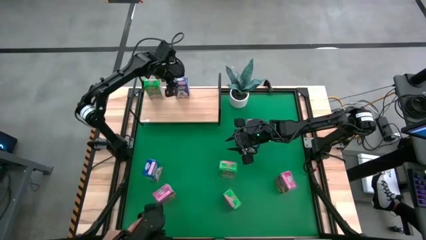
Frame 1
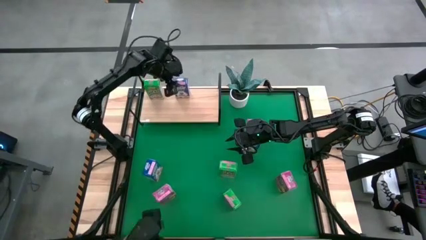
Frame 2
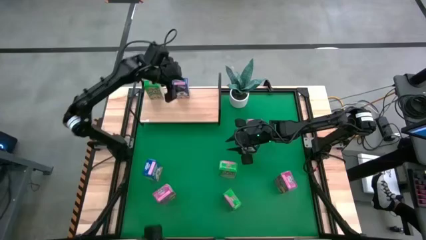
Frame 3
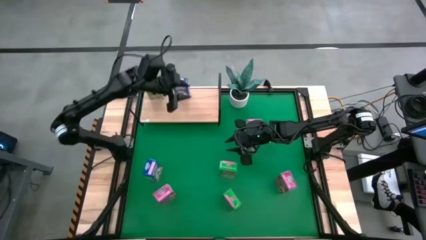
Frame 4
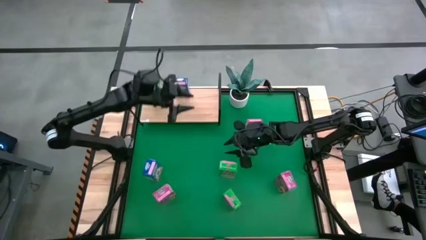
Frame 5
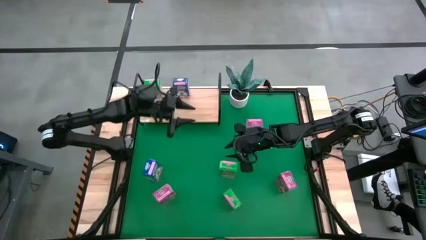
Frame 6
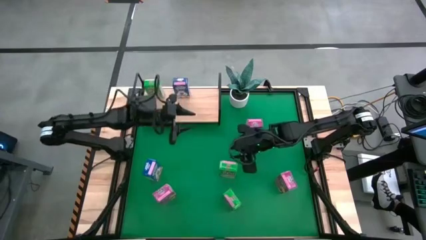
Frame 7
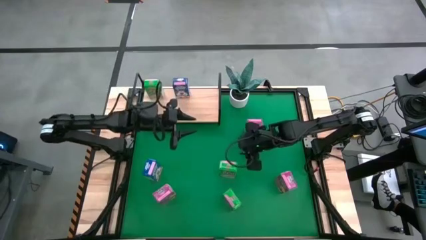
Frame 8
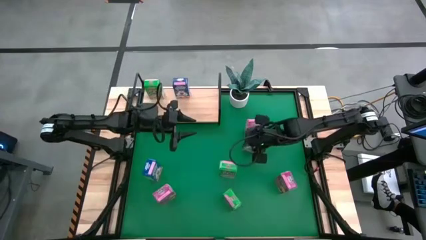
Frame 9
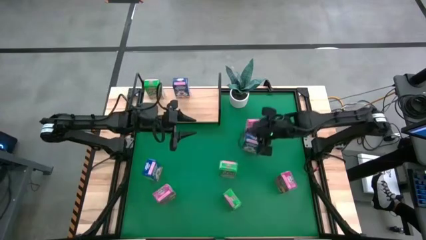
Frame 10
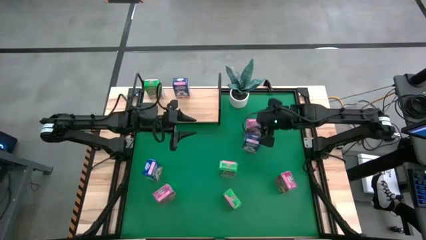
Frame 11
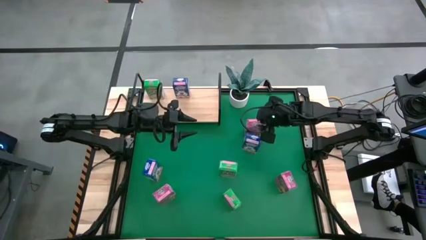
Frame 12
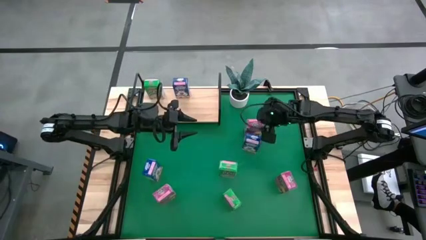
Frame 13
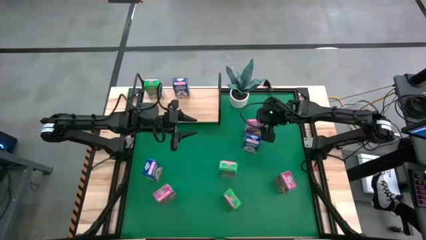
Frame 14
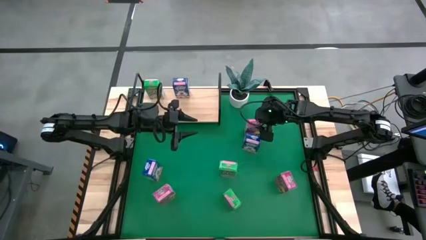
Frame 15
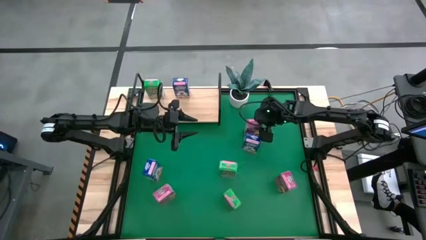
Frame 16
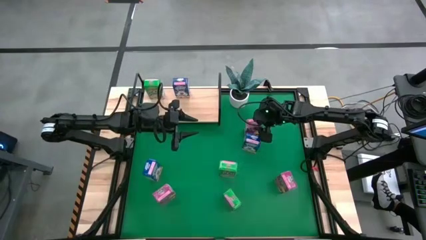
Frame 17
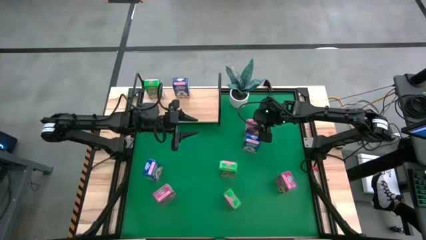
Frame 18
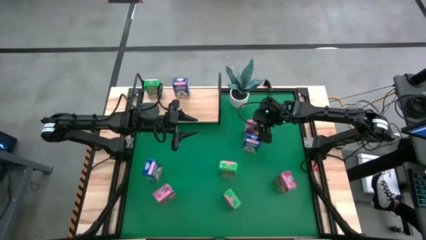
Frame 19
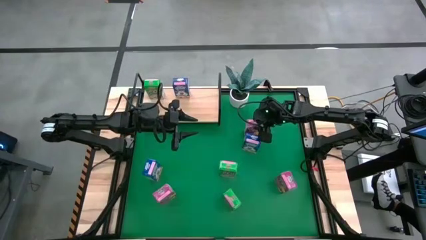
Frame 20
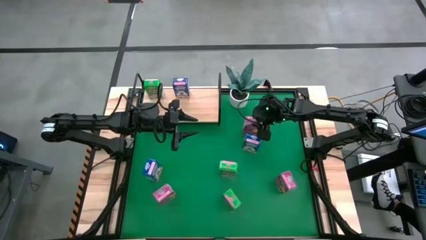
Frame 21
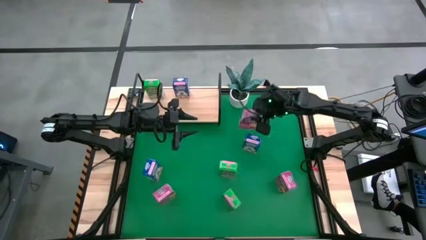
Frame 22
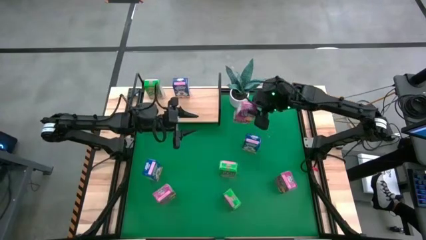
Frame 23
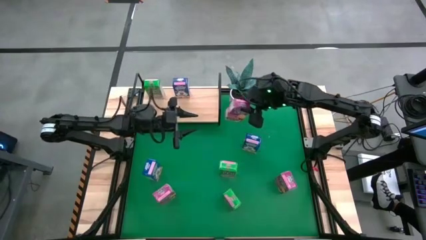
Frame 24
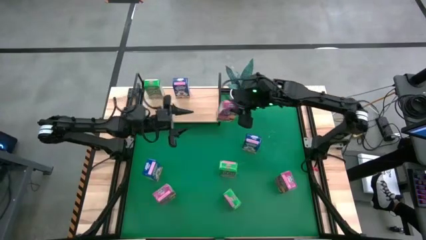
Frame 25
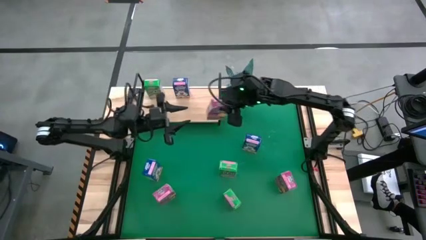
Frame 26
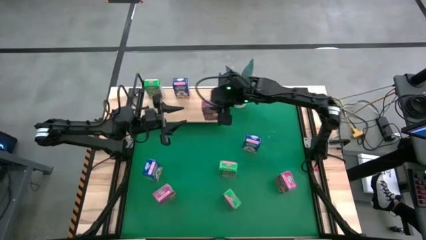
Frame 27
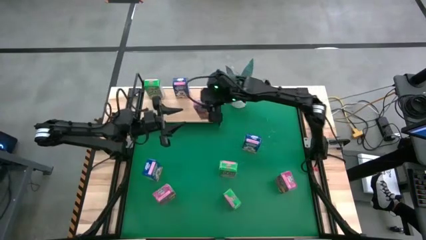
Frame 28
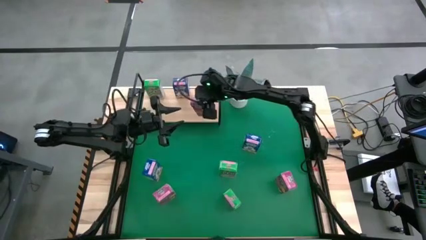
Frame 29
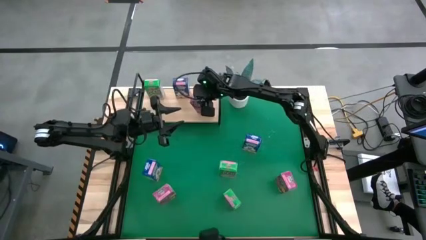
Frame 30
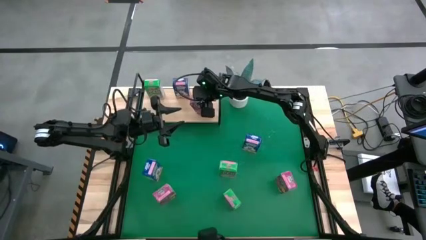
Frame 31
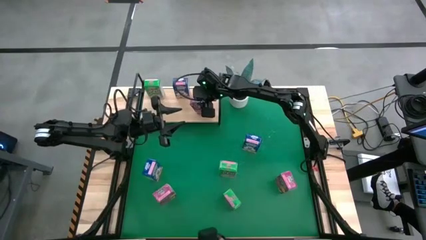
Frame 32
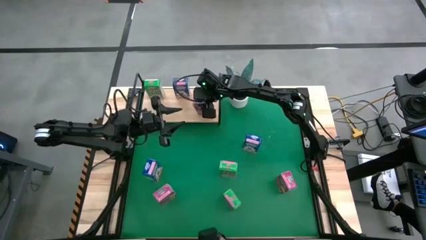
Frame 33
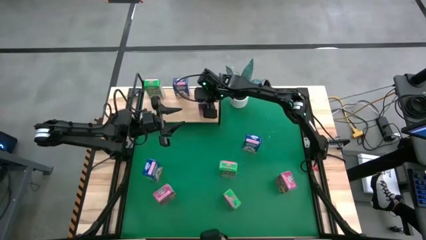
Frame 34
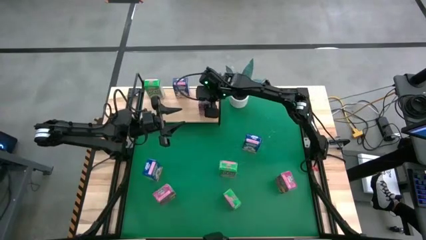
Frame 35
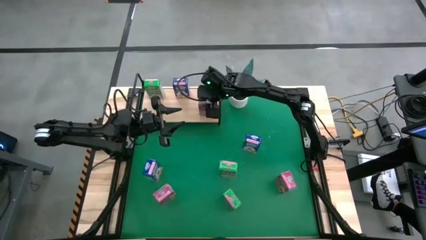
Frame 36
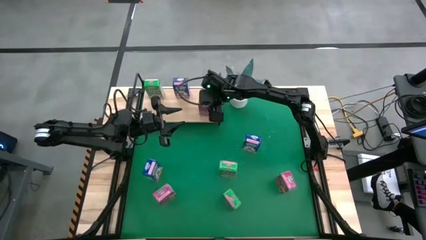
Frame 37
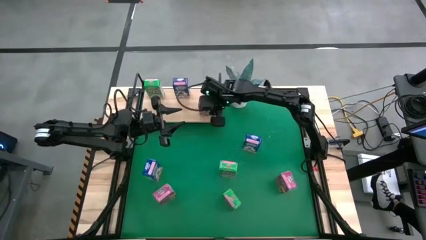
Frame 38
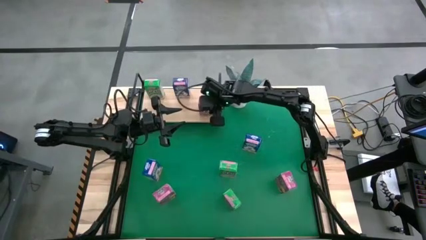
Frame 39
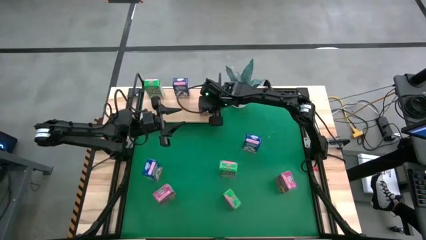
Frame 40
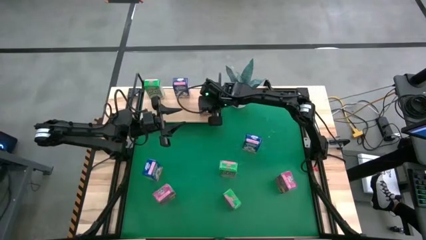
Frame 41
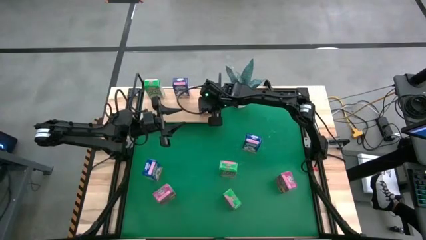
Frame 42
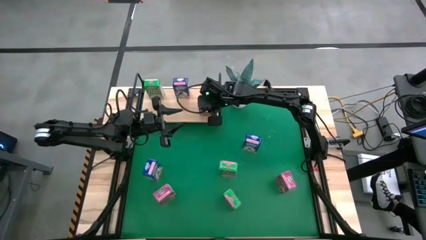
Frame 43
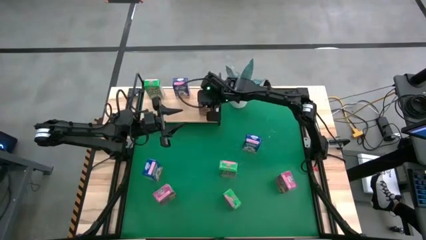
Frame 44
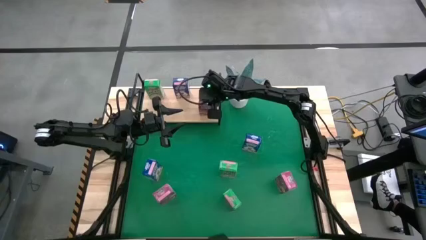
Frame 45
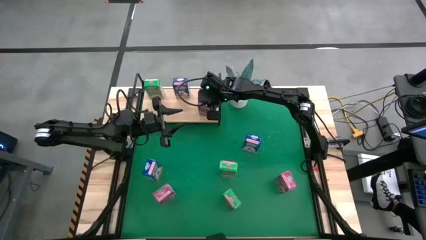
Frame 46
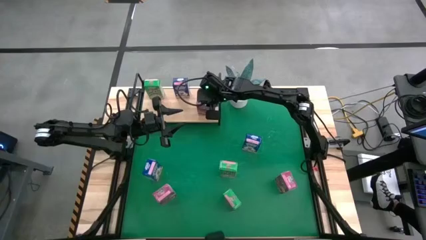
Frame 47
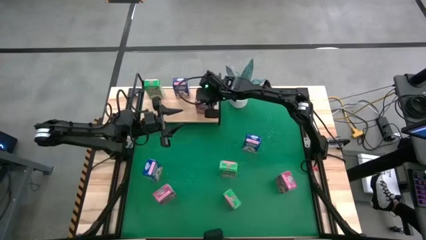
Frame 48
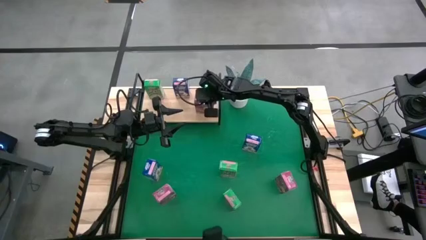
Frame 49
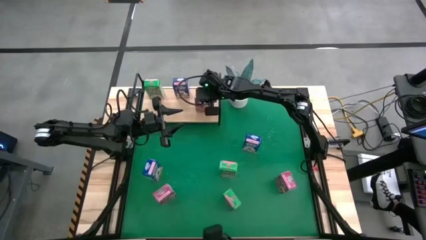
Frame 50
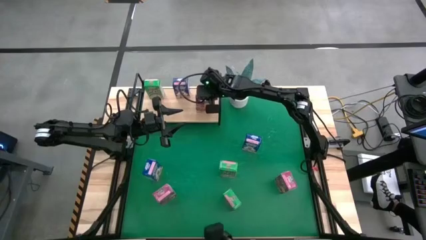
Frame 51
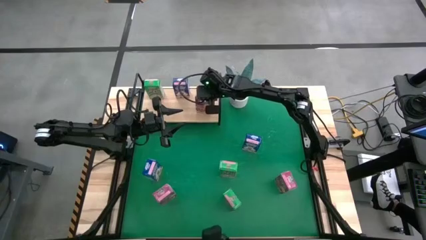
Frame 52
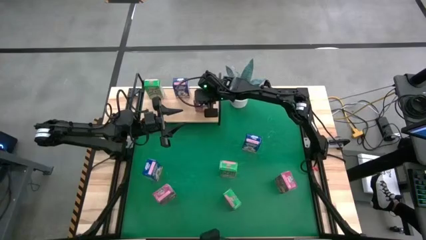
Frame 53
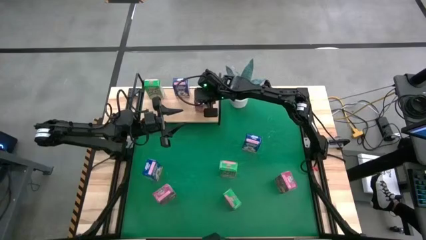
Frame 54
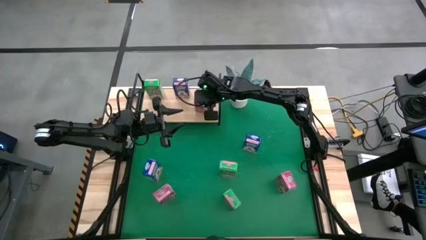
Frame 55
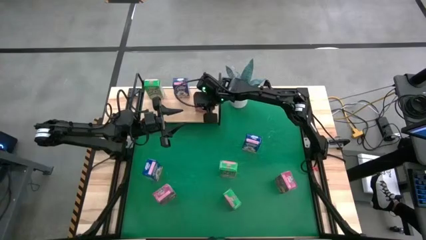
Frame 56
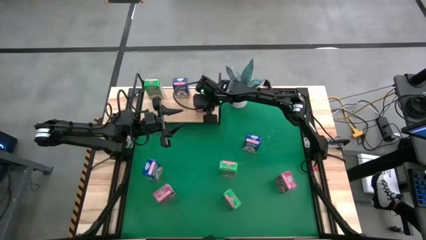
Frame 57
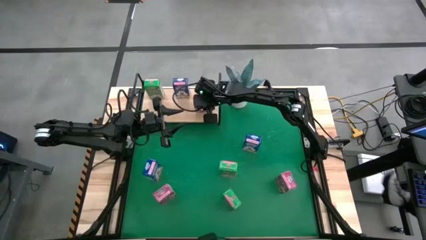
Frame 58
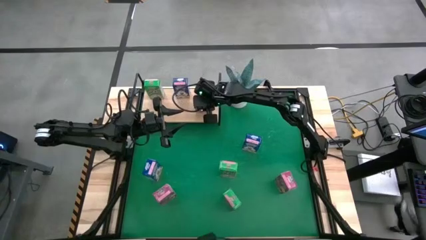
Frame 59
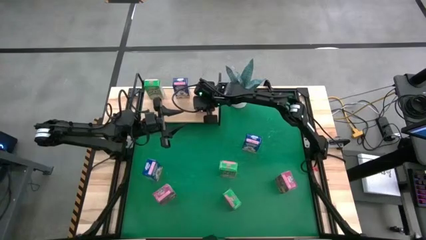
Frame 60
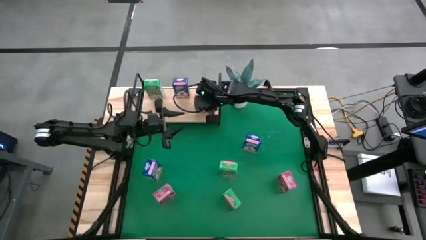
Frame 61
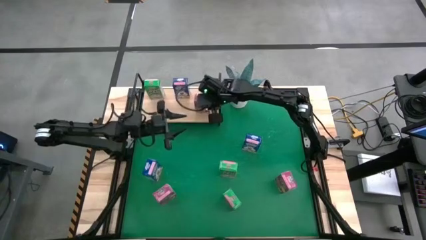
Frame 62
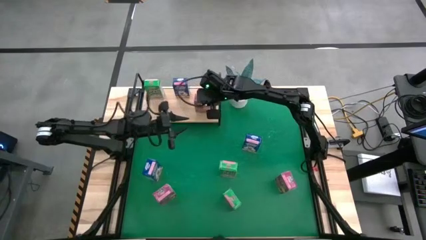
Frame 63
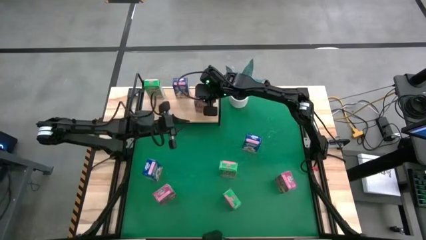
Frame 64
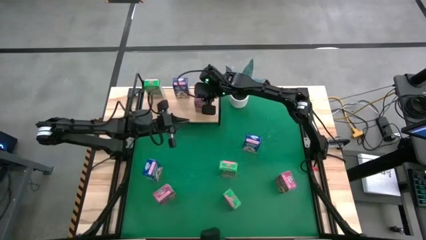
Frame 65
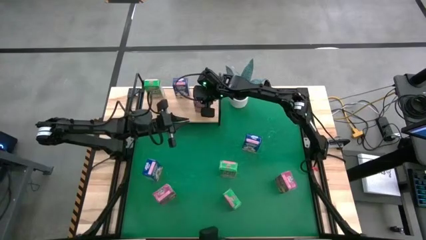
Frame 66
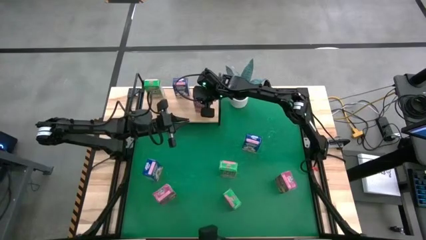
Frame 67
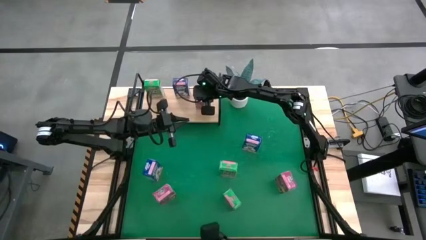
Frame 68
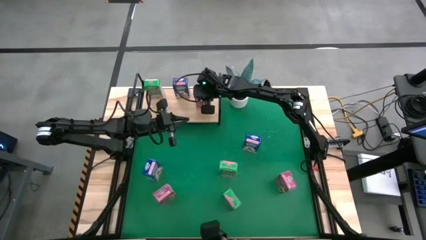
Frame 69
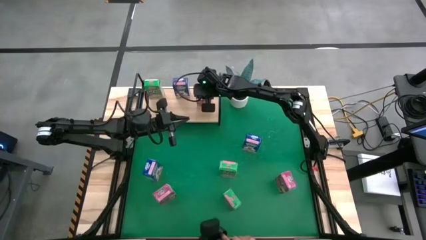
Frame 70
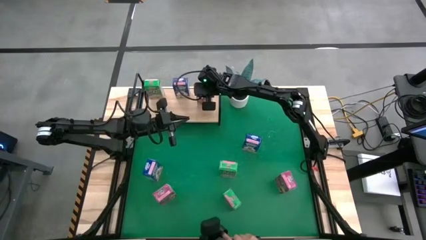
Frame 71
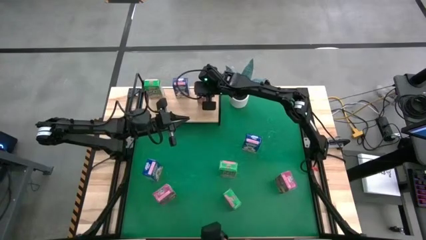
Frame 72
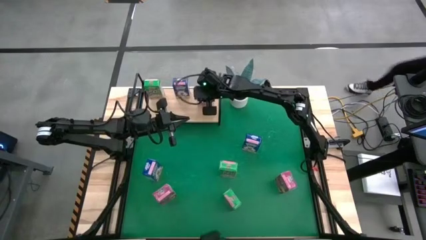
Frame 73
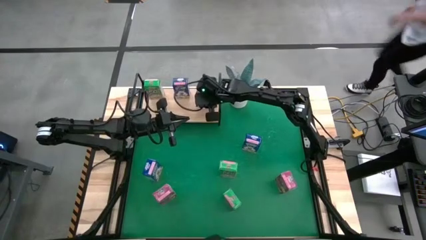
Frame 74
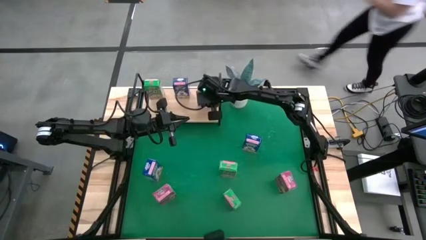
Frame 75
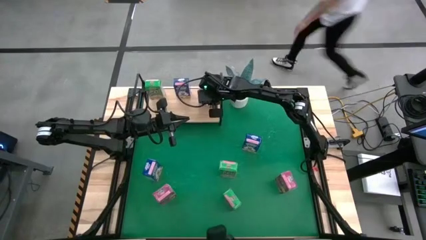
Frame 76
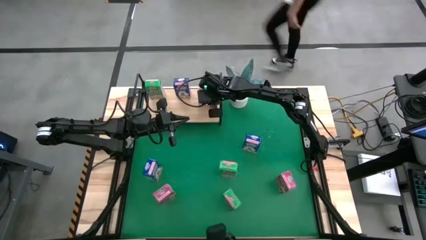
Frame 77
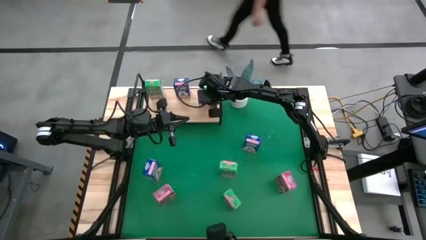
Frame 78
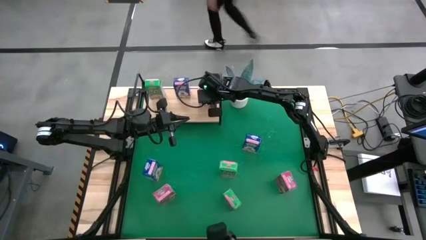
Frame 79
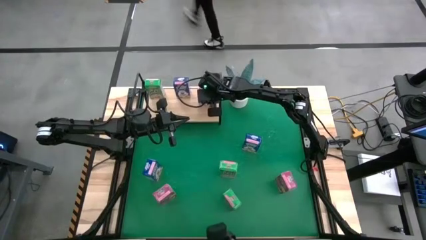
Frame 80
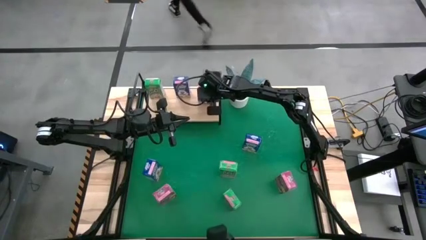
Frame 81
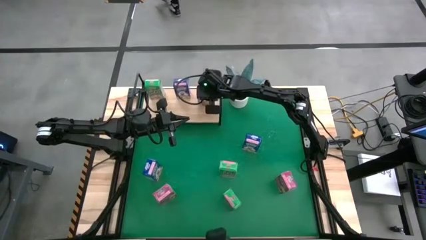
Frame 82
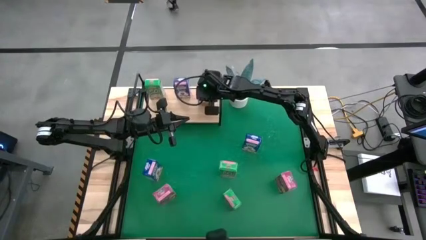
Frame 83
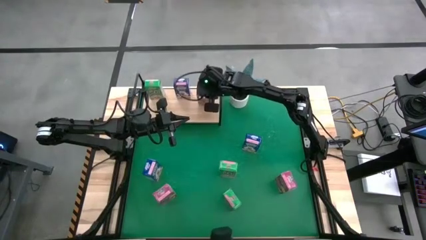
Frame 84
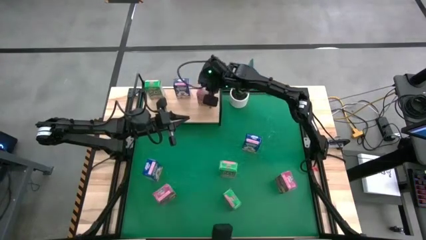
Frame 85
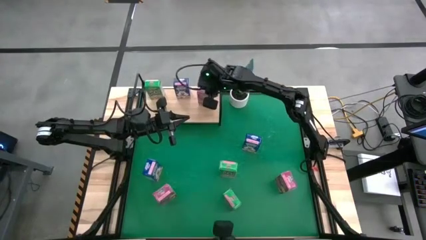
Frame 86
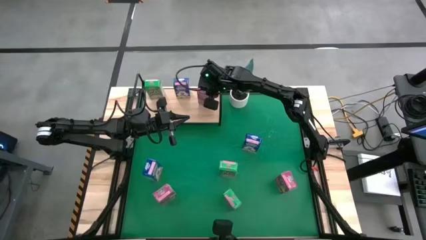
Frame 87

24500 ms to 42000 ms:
Task: Stack cereal on shelf
Put the top pink cereal box on the shelf
